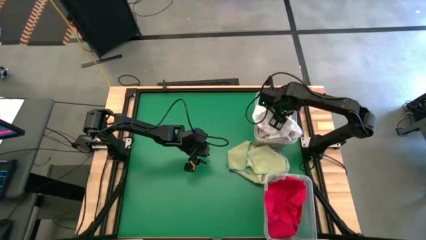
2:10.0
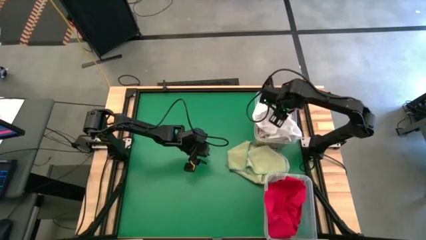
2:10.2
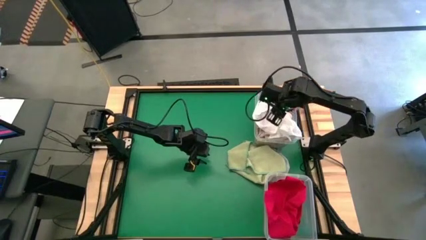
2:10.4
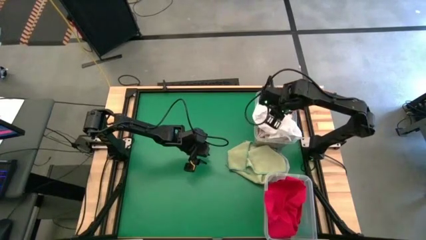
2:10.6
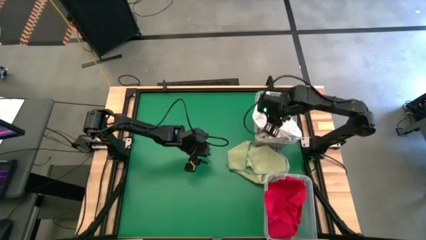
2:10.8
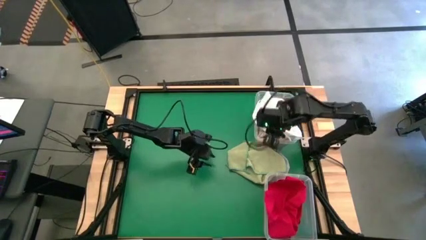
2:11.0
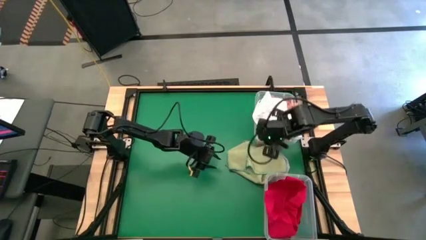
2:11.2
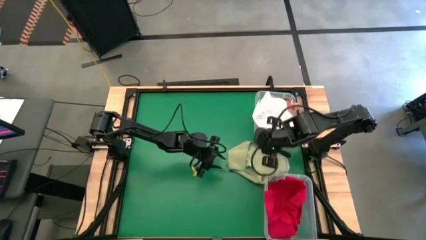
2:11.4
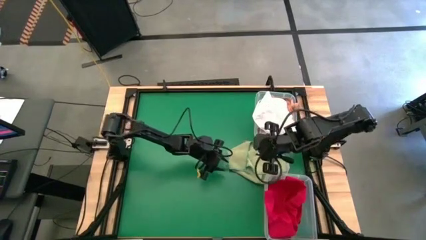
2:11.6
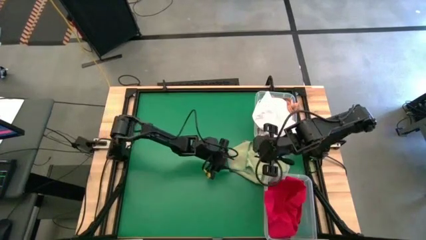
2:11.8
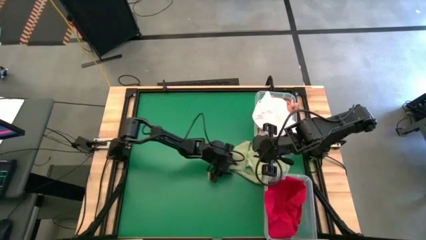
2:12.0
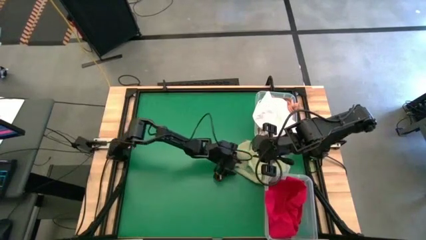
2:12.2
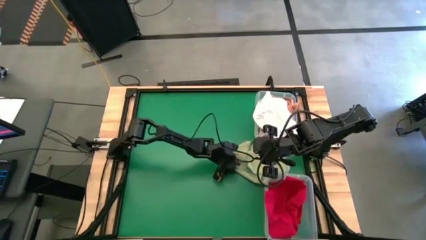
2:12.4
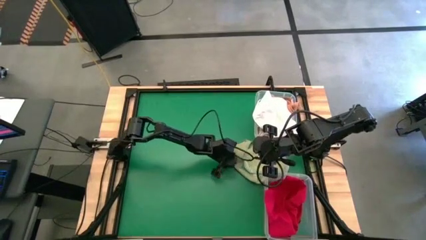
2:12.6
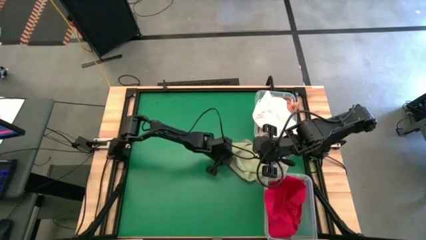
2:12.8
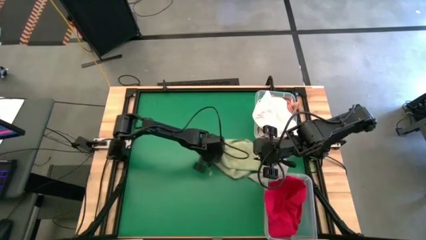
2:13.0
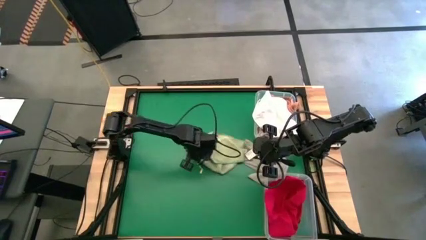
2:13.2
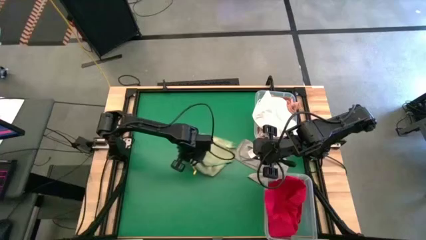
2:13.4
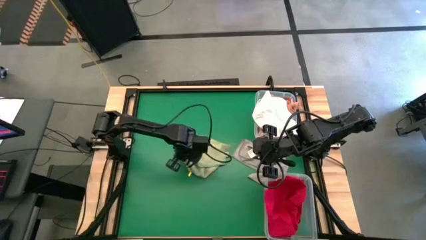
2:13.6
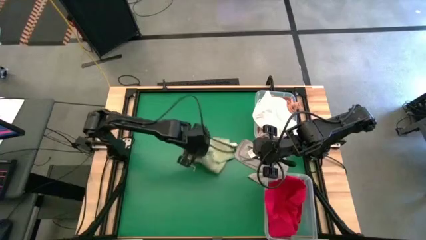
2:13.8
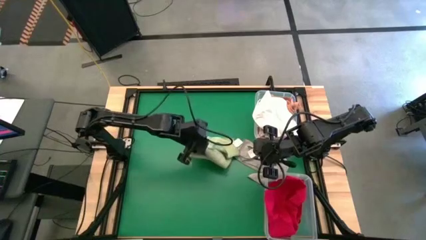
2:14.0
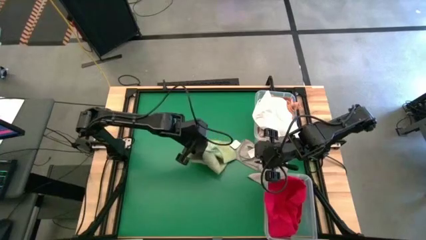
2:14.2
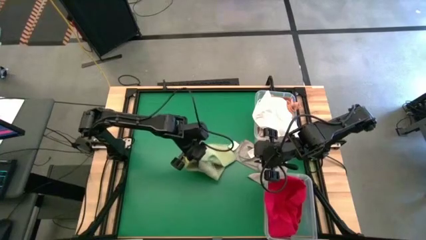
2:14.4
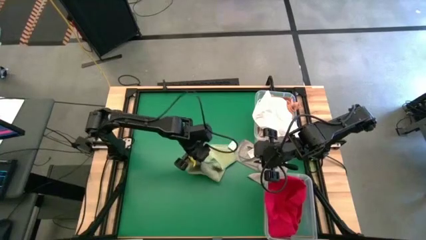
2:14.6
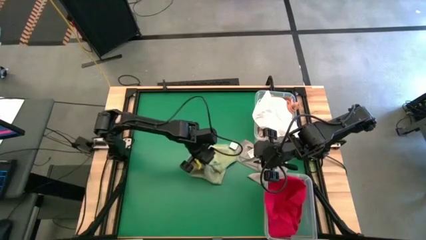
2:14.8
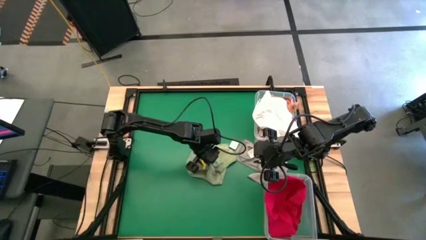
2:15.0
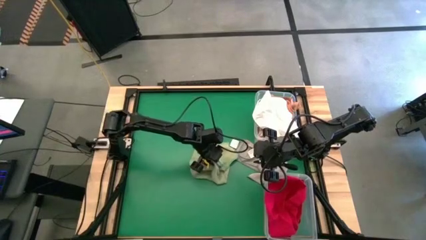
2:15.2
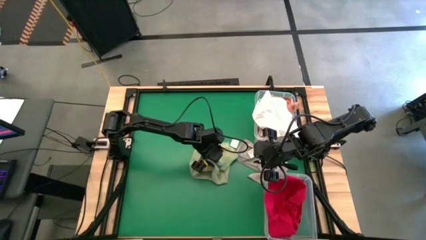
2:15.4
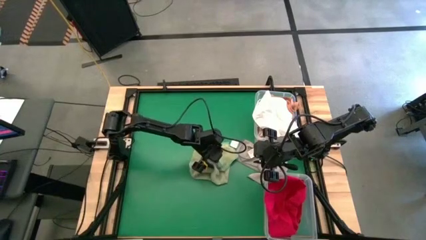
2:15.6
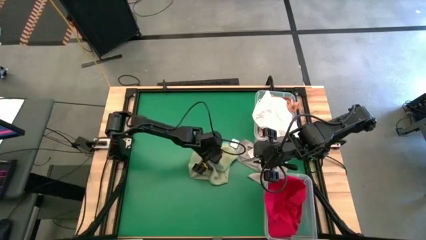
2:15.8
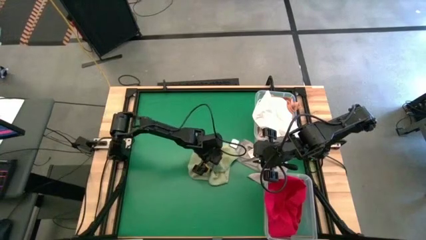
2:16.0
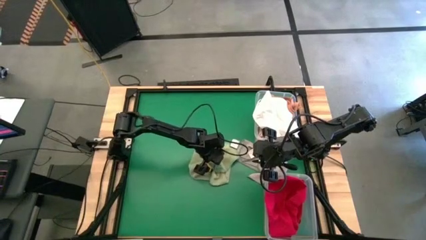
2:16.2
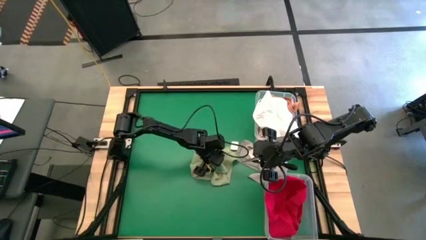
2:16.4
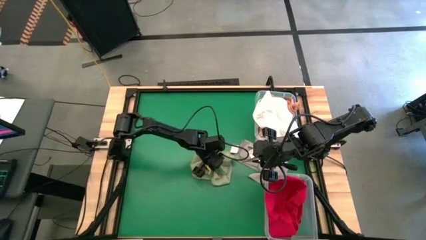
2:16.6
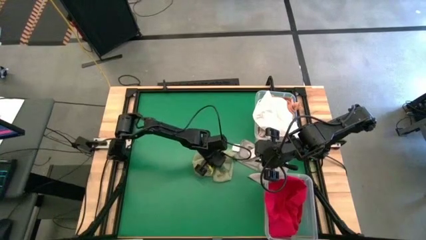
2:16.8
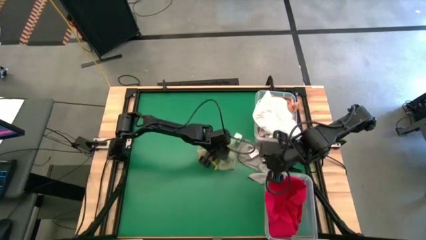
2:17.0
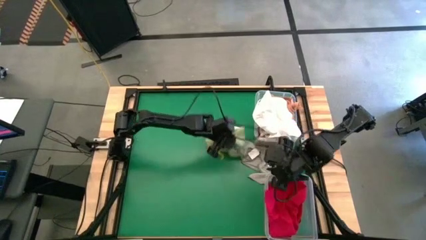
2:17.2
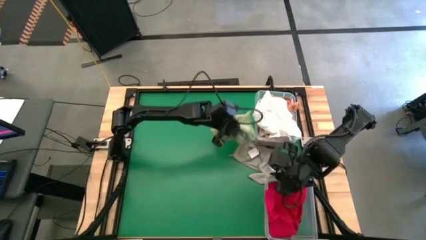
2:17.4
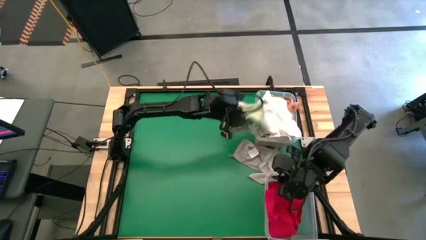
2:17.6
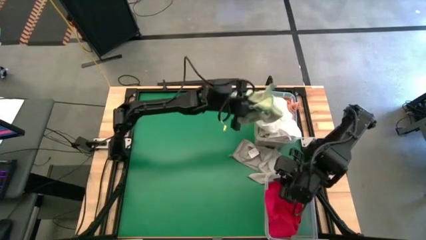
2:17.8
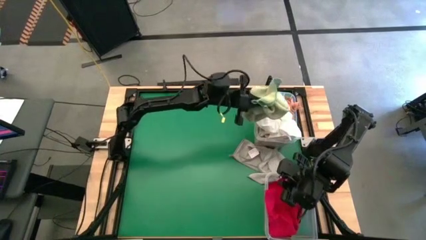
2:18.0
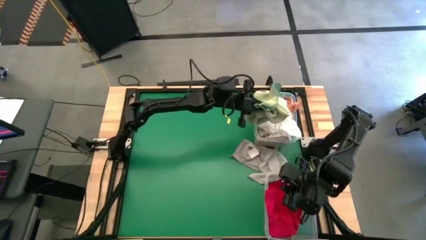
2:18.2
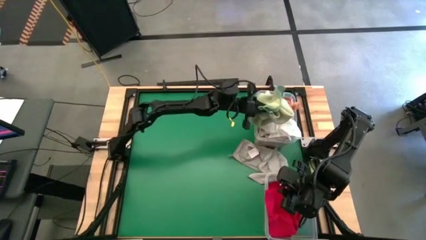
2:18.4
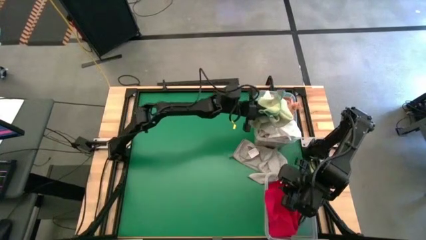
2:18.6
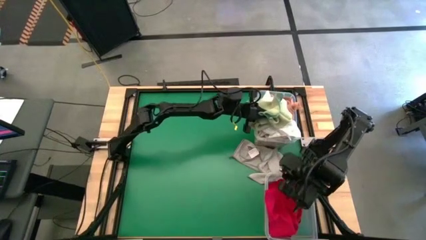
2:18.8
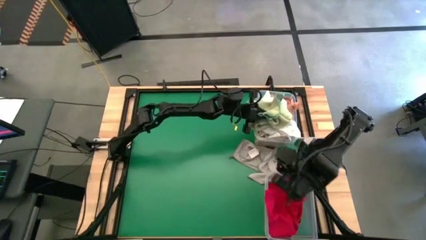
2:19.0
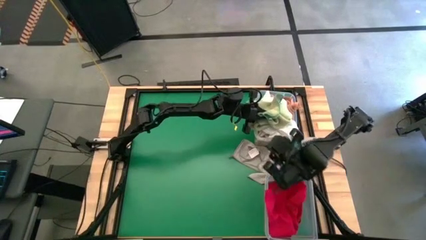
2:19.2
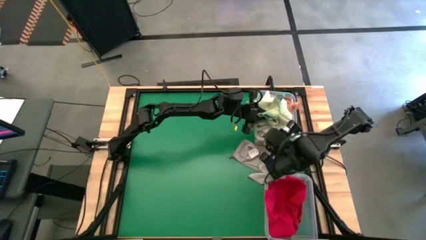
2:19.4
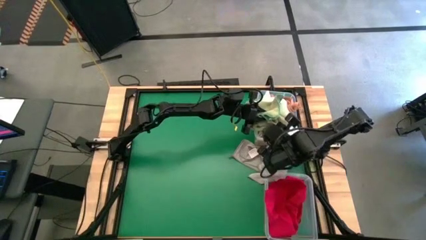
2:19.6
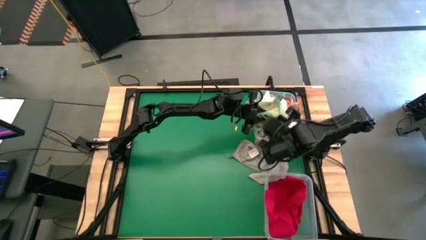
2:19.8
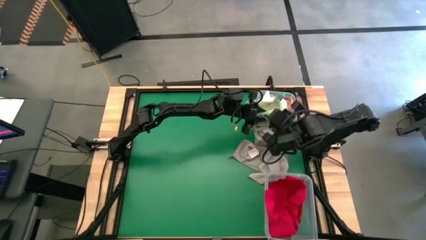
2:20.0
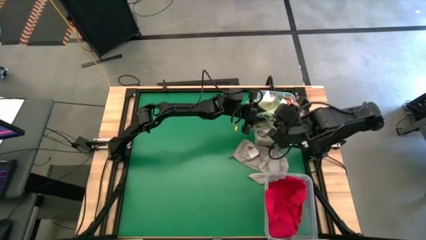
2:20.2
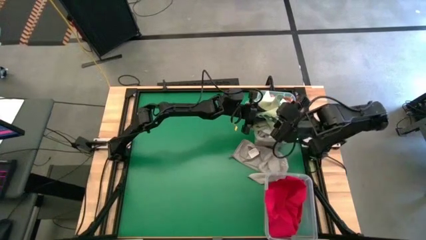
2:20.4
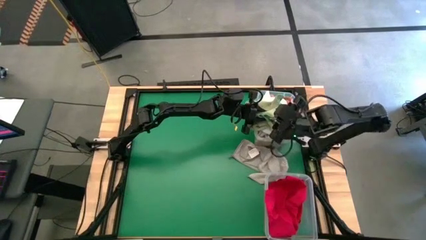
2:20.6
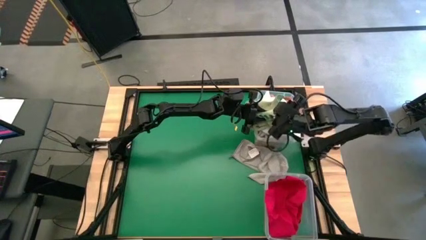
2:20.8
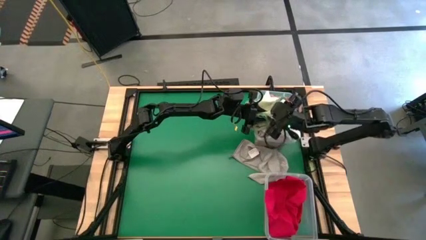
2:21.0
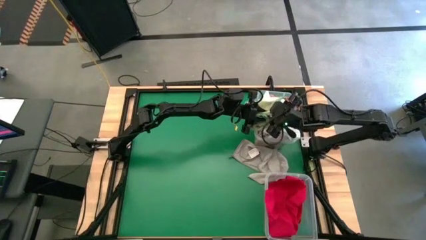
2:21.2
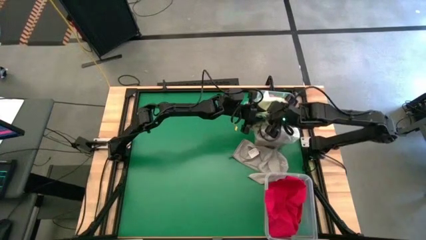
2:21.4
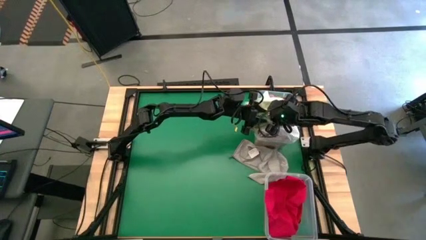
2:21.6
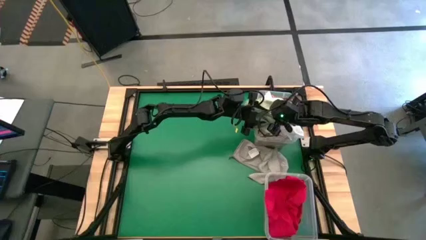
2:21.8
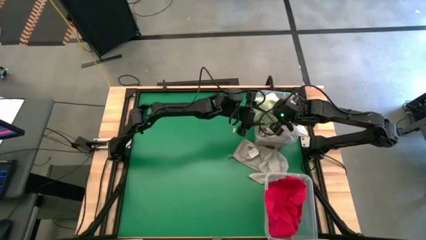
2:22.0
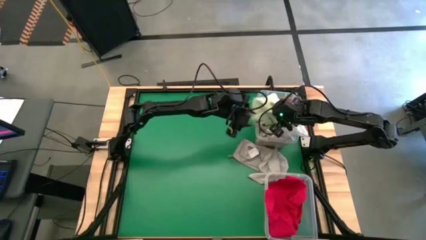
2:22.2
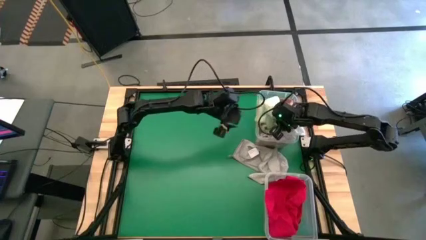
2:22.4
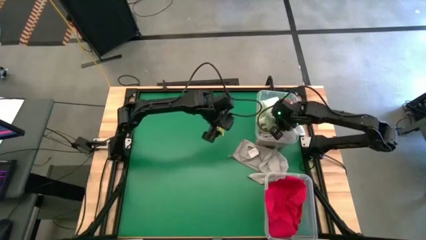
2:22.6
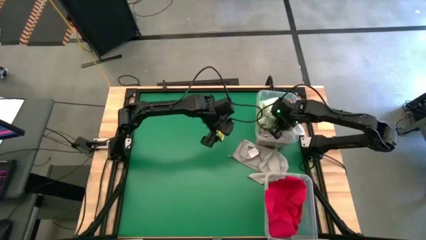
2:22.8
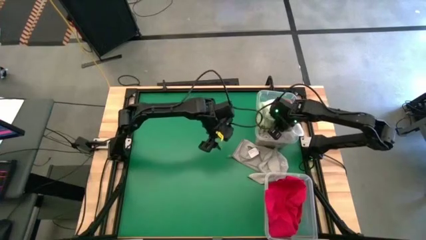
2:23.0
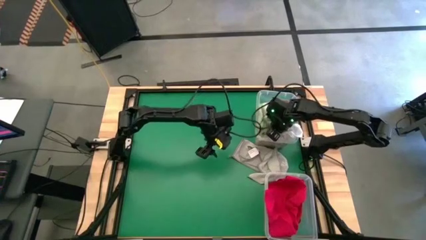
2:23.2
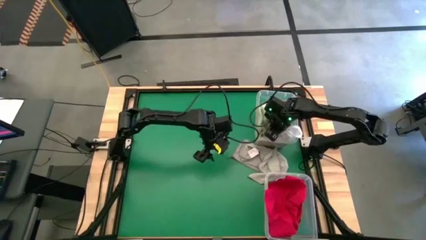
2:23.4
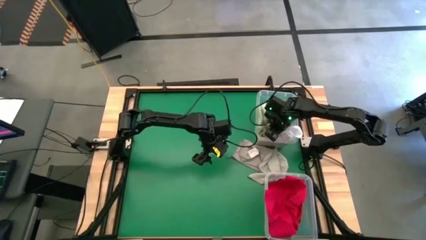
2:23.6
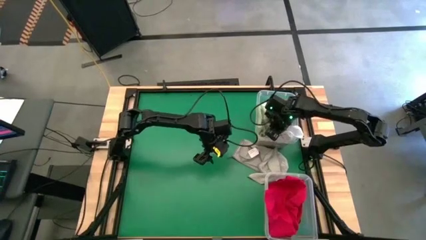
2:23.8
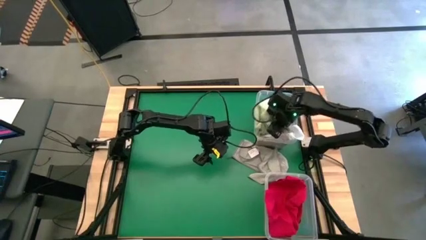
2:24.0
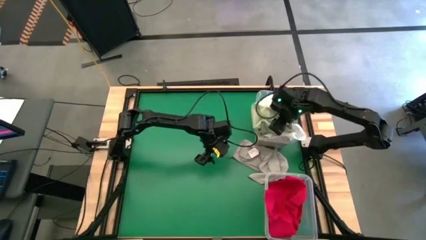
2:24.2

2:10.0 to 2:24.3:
Task: Sort towels by color in basket
Put the green towel into the top transparent bin

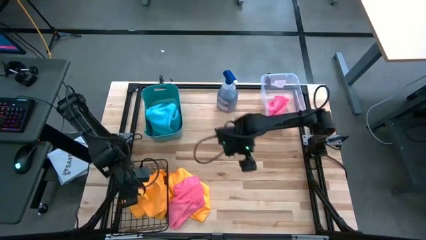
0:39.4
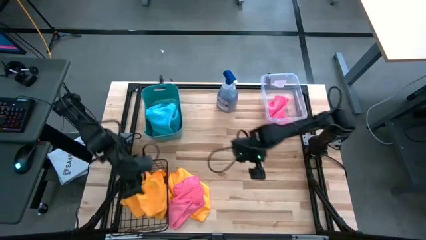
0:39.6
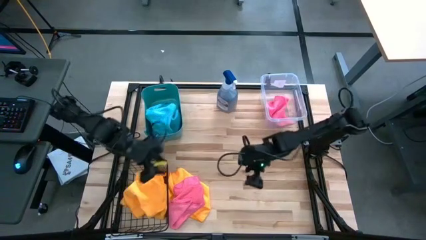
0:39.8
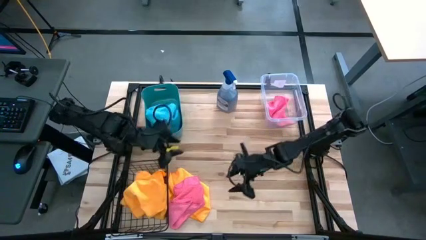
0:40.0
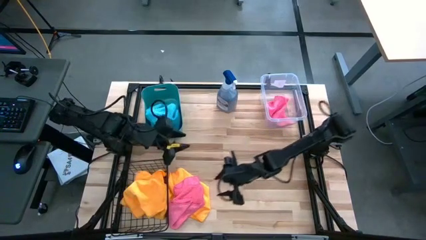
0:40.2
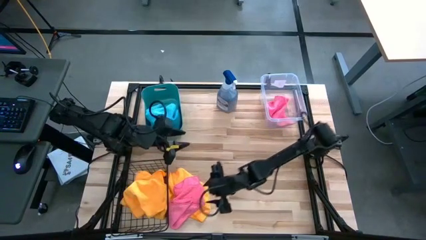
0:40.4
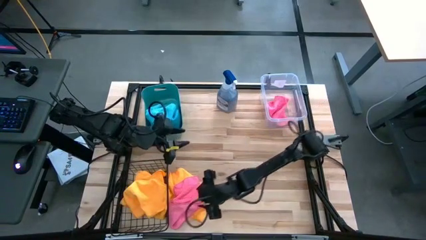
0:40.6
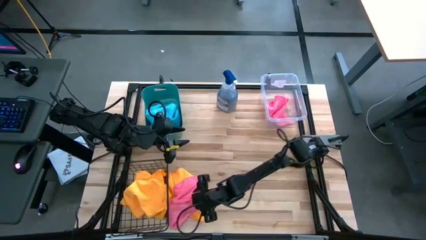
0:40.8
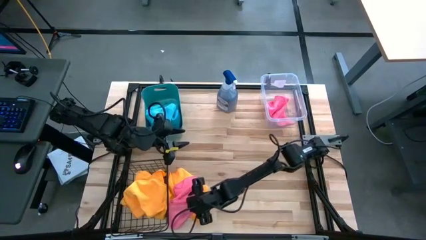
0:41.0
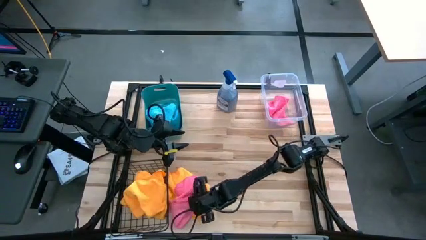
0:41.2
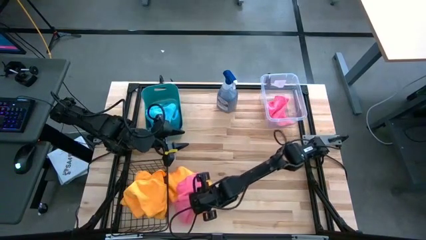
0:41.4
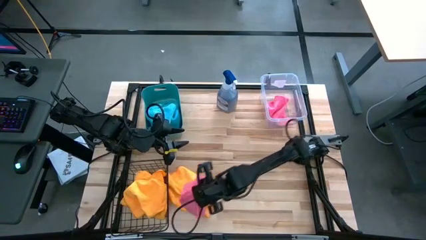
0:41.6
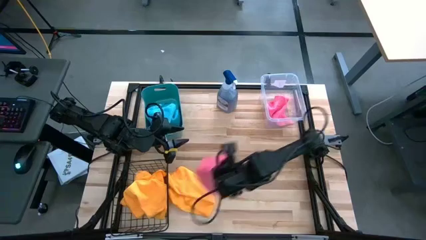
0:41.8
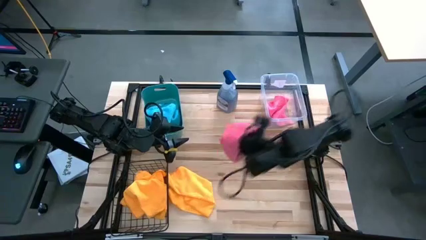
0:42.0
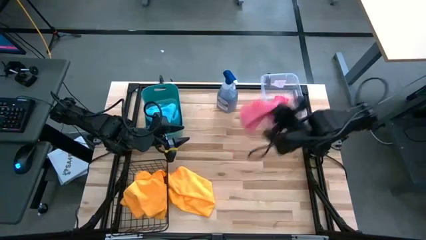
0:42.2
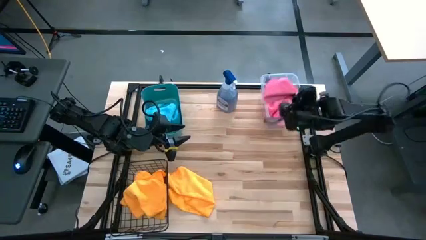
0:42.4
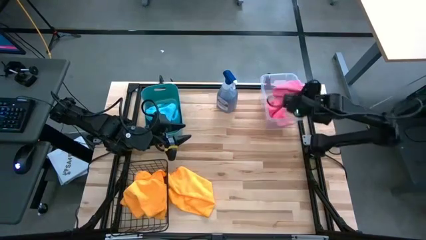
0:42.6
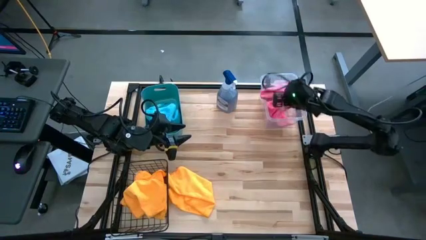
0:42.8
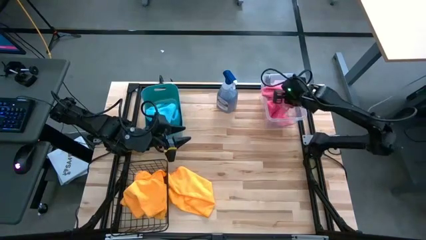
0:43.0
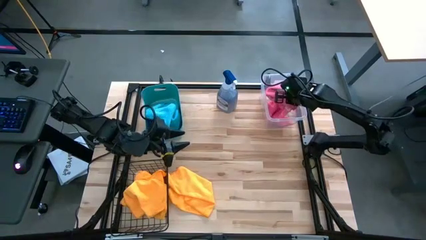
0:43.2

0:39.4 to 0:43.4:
Task: Sort microfiber towel by color & place in baskets
Put the pink towel in the transparent bin
